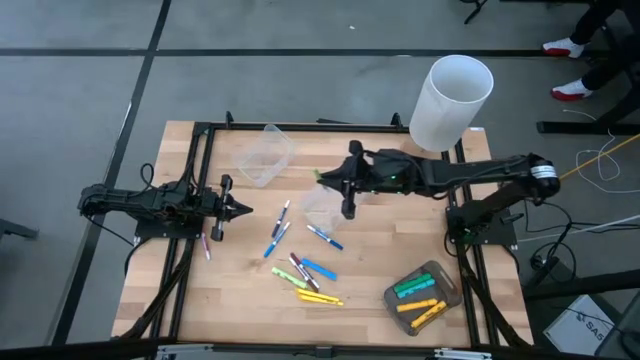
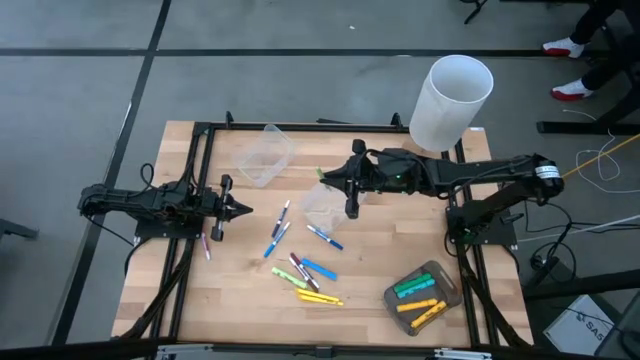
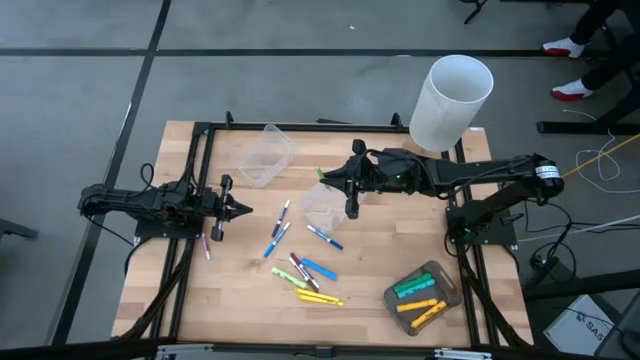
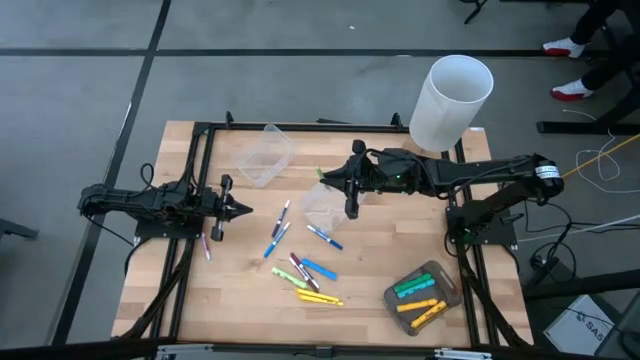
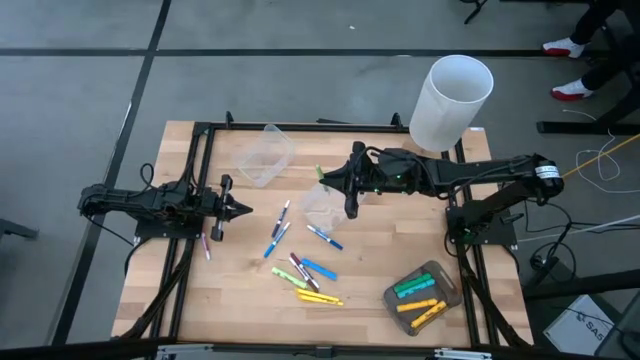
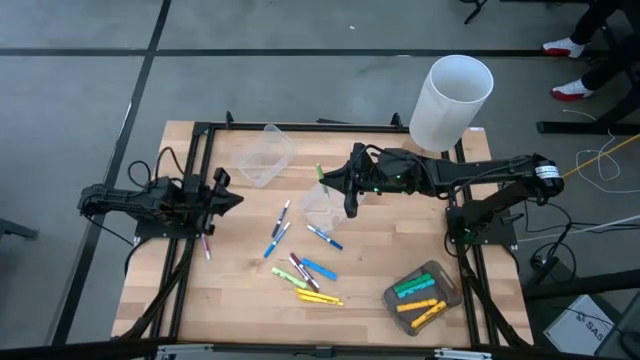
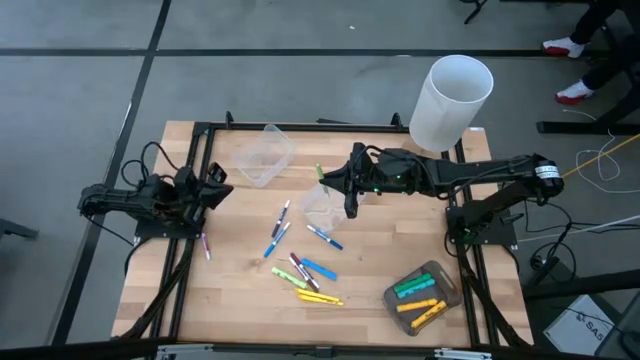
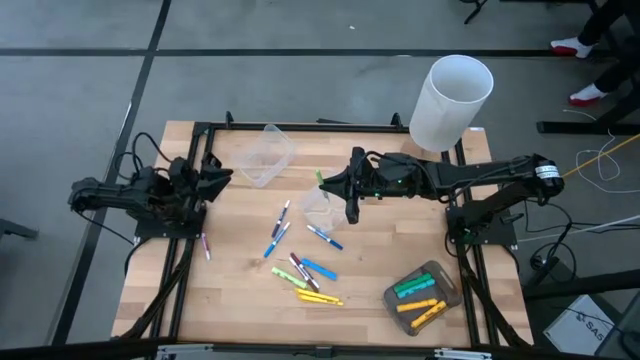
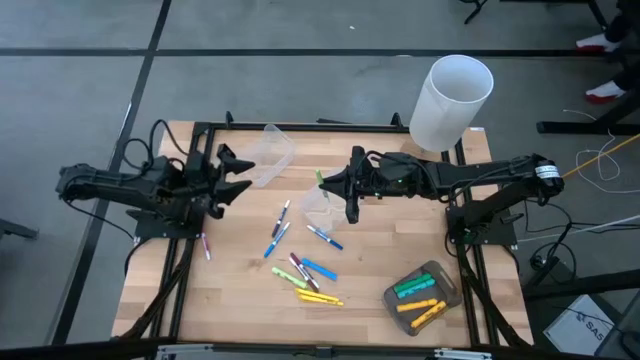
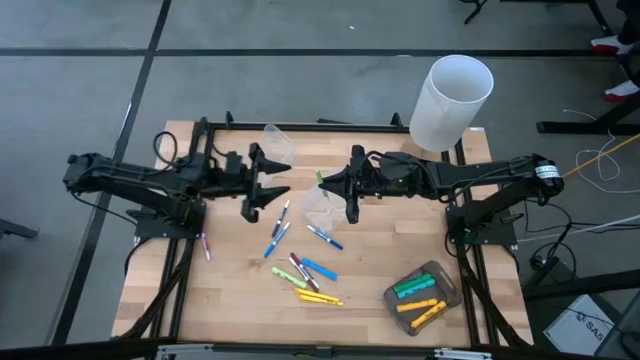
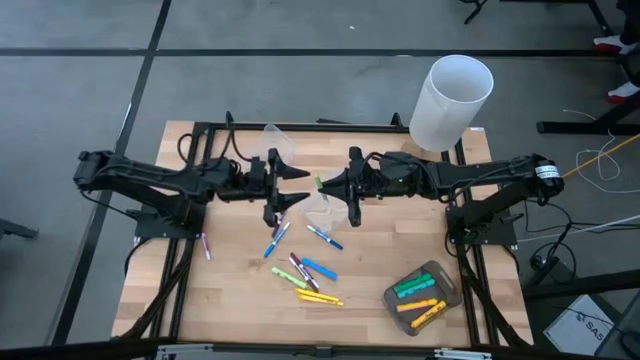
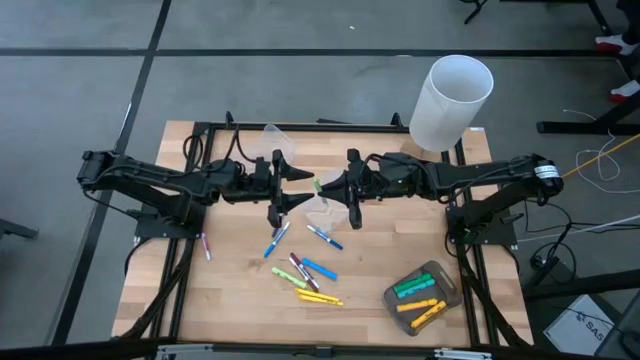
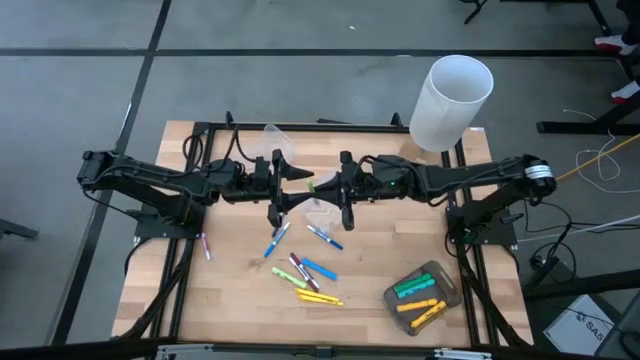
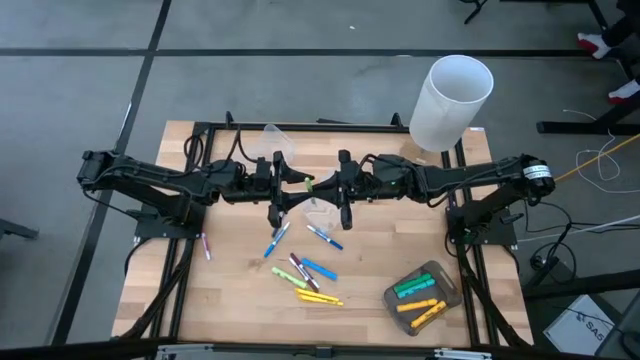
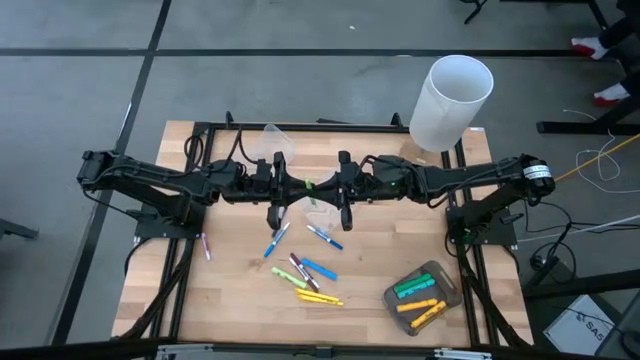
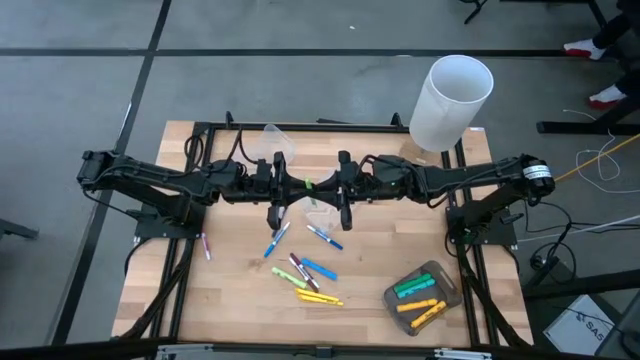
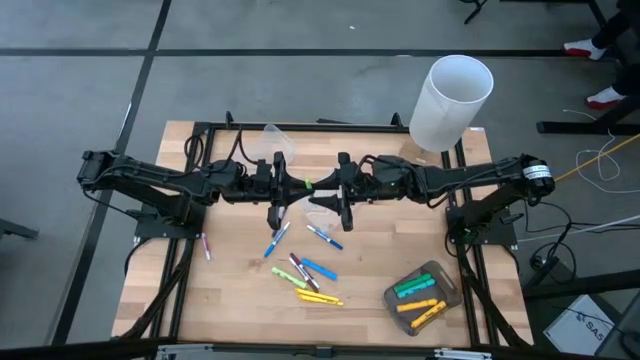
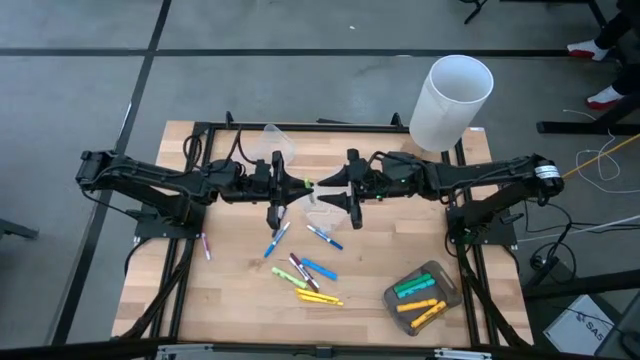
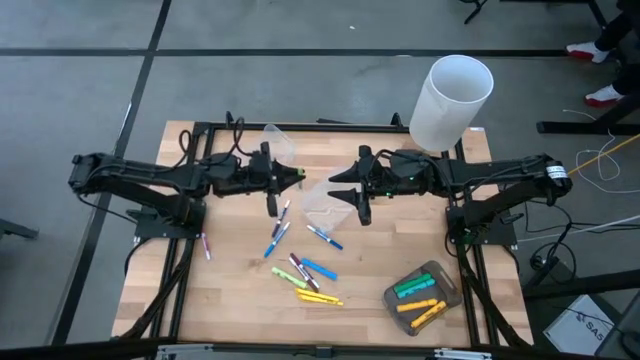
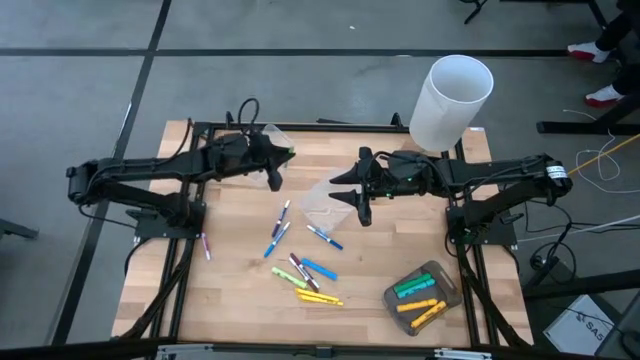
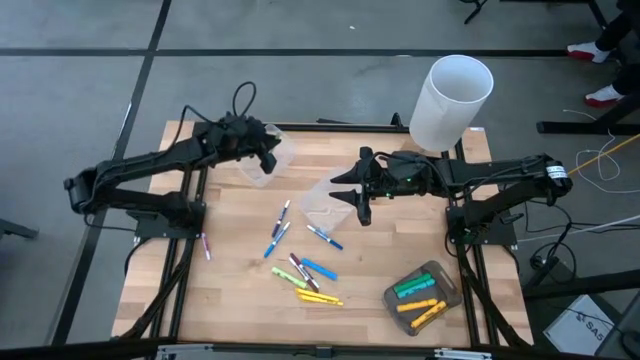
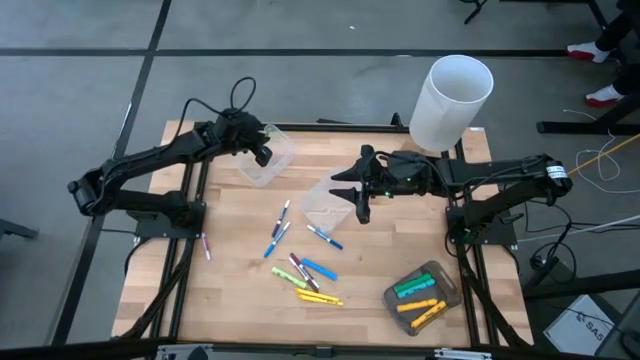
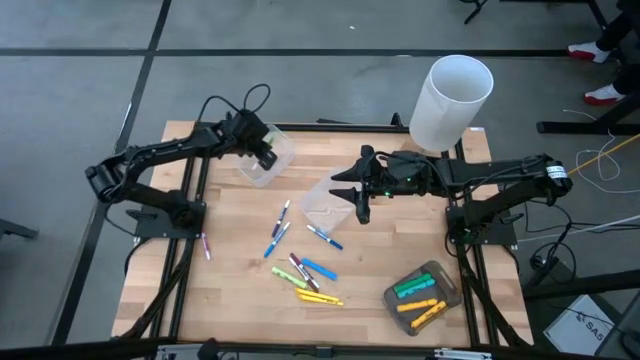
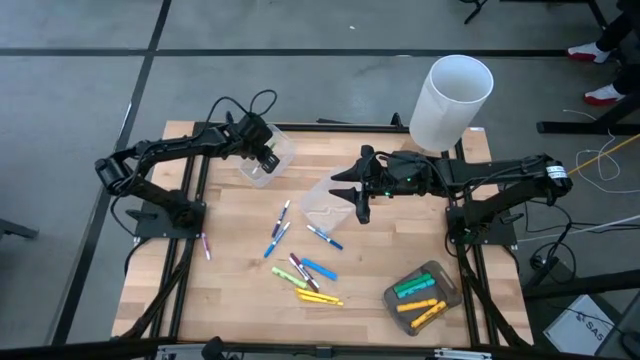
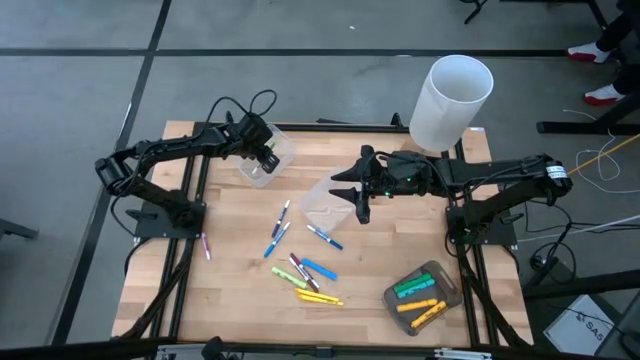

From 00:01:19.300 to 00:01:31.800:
Task: Pick & Place Markers
Put the green marker into the transparent bin

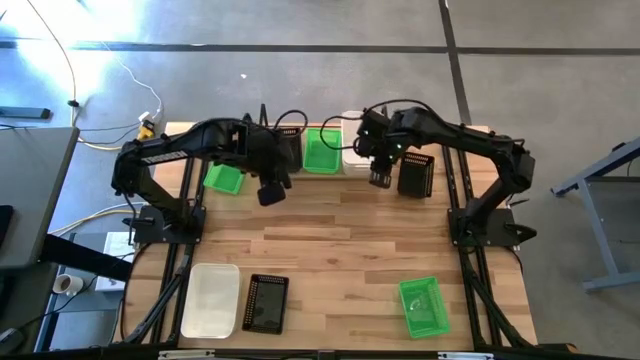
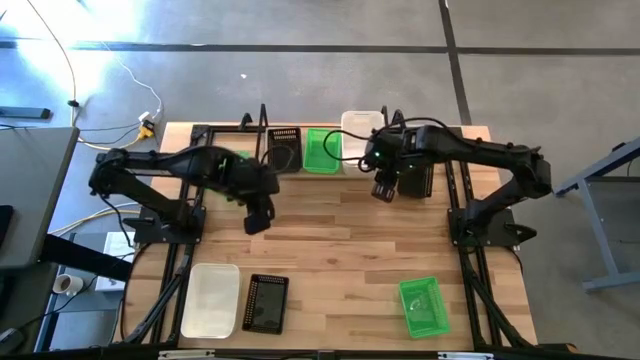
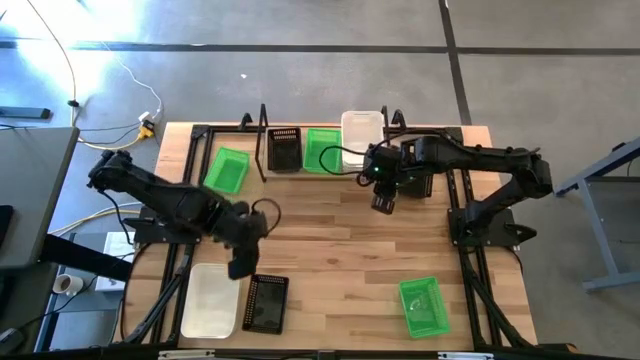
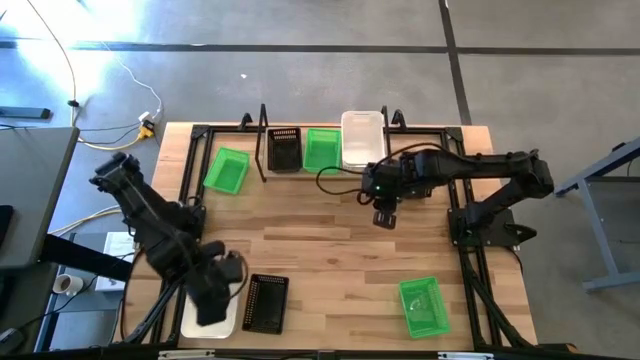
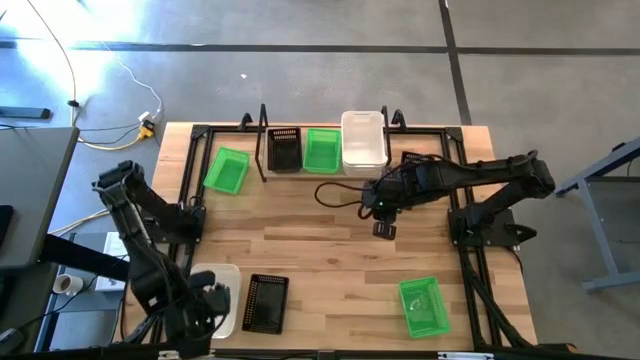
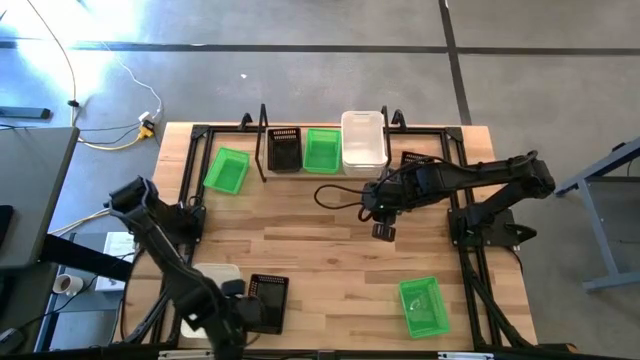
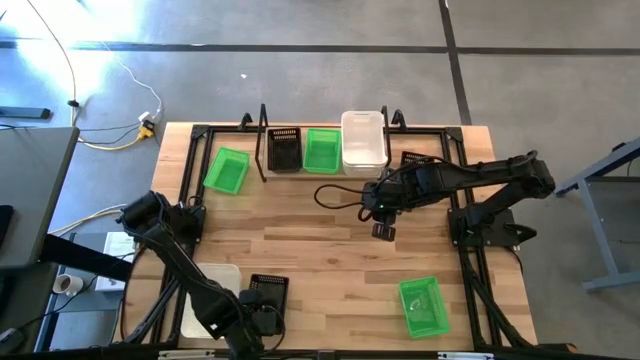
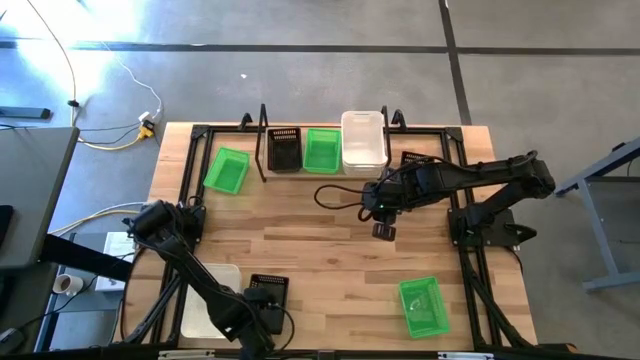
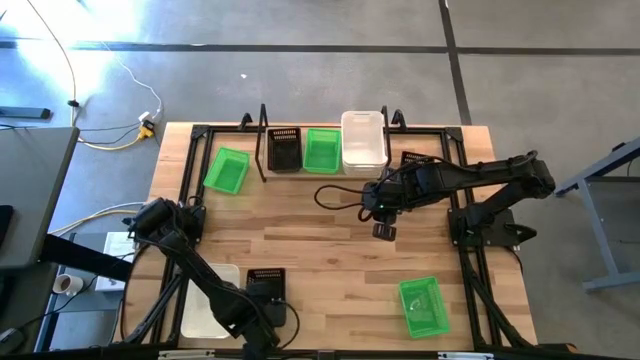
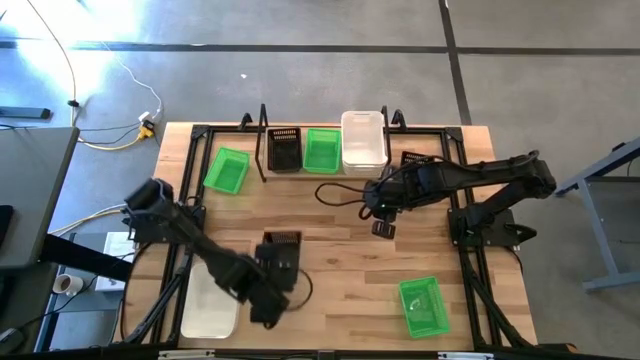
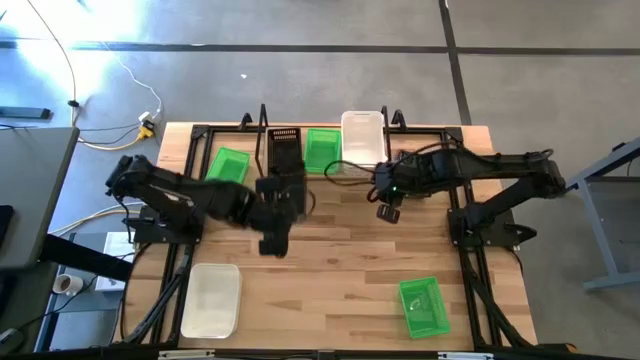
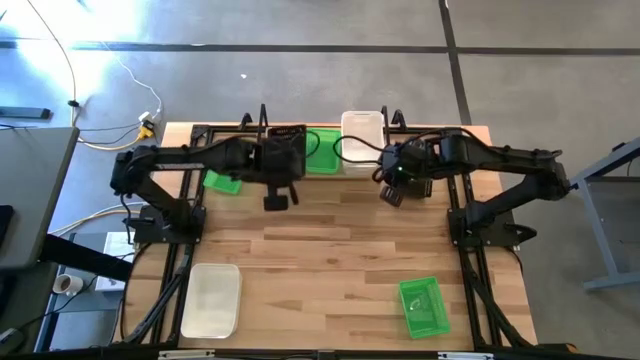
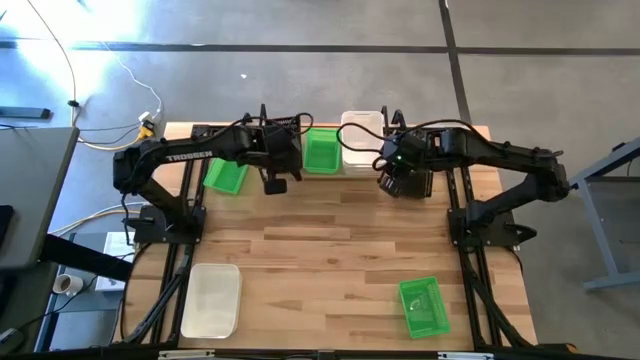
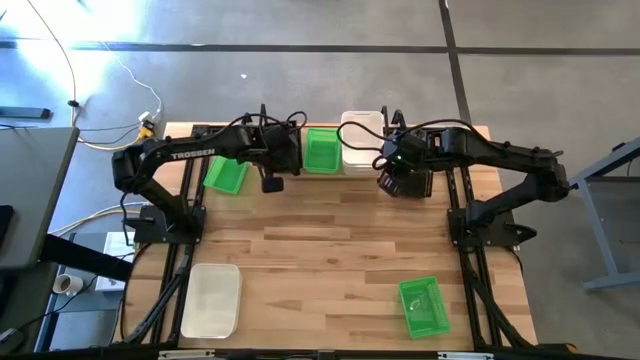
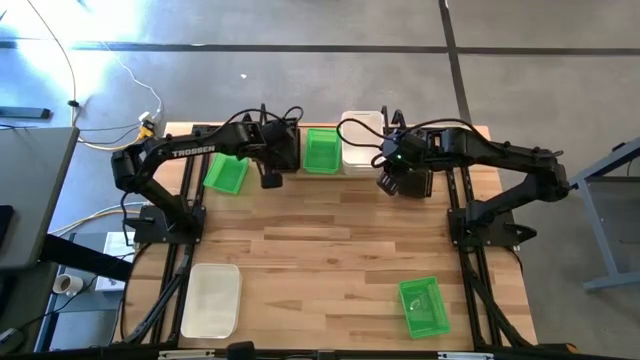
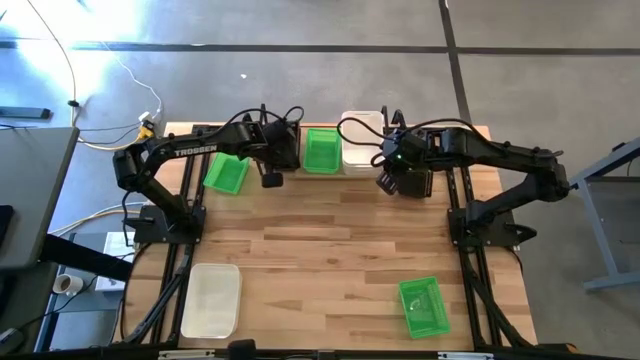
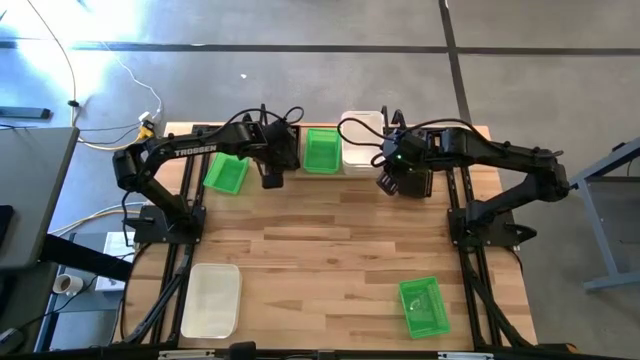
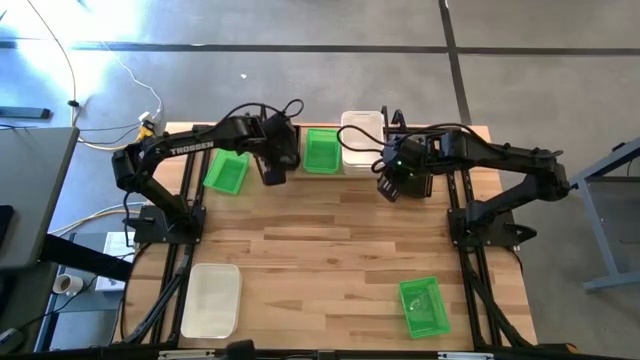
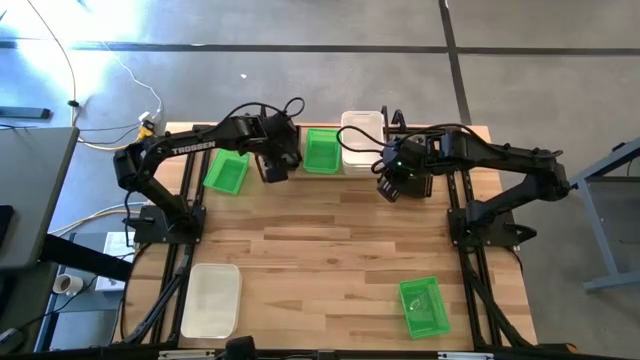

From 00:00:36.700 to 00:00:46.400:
Task: Stack baskets on shelf by color
Stack the bottom black bin on the black bin on the shelf
